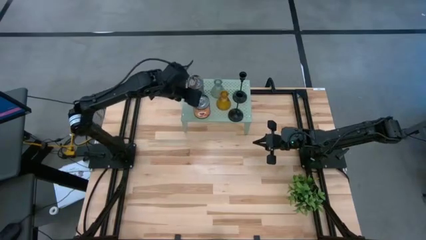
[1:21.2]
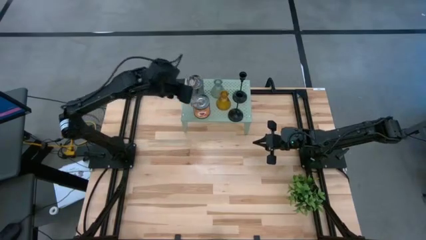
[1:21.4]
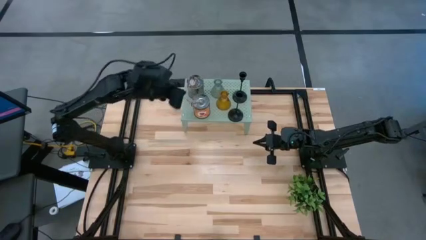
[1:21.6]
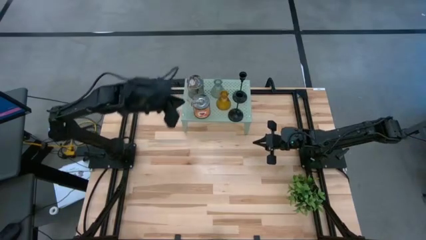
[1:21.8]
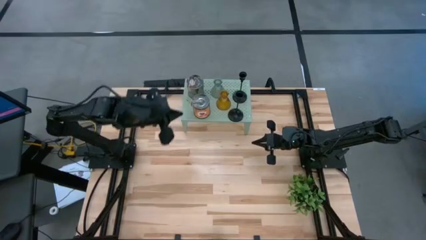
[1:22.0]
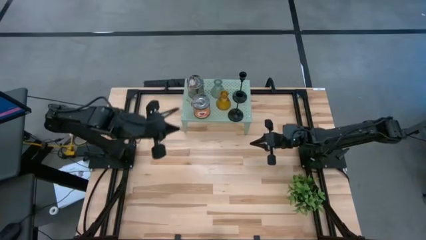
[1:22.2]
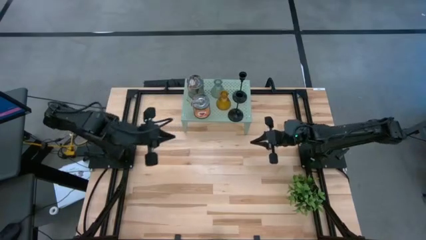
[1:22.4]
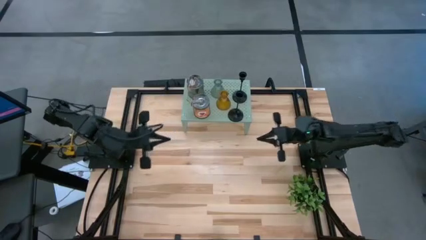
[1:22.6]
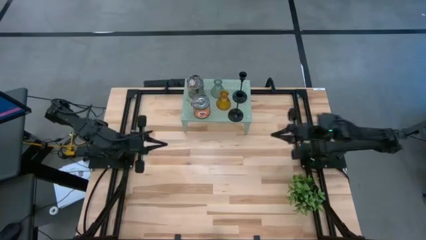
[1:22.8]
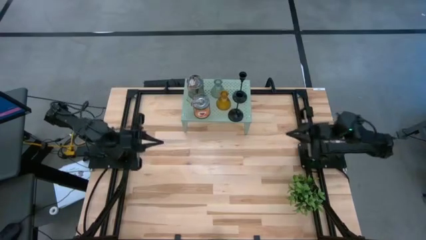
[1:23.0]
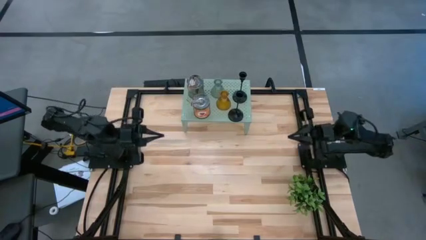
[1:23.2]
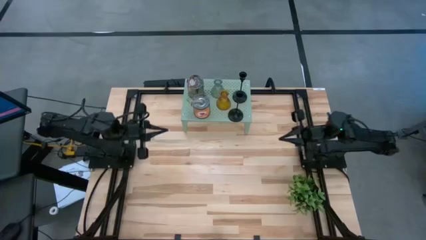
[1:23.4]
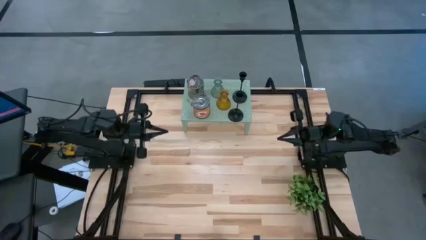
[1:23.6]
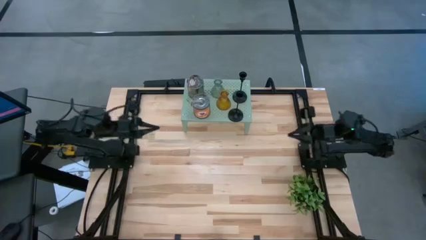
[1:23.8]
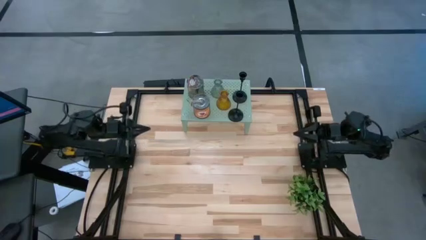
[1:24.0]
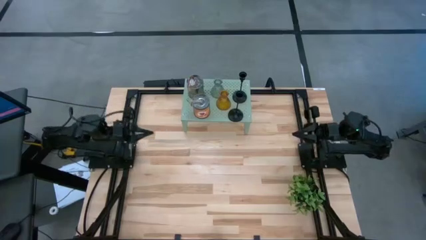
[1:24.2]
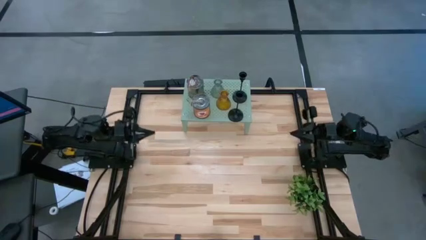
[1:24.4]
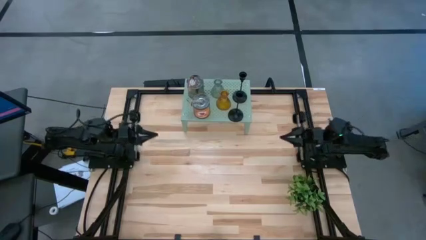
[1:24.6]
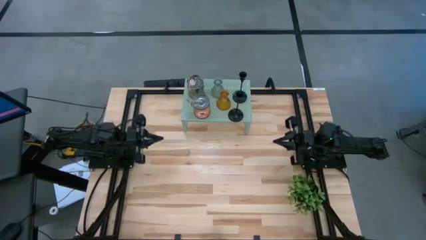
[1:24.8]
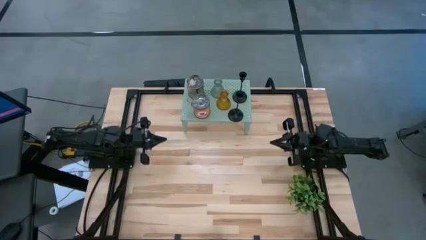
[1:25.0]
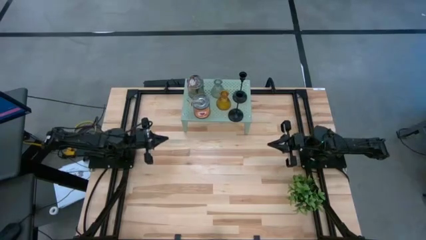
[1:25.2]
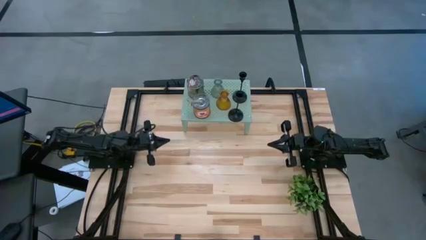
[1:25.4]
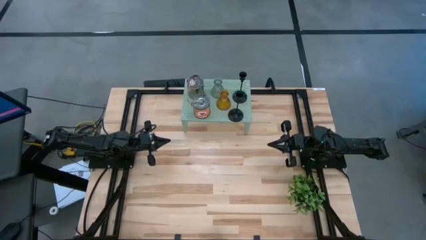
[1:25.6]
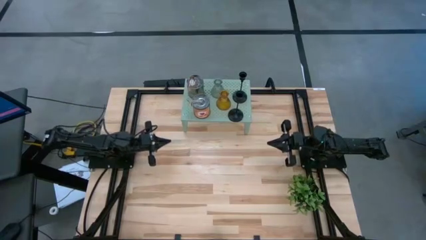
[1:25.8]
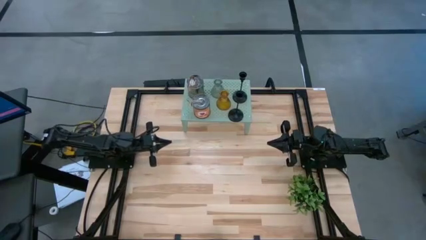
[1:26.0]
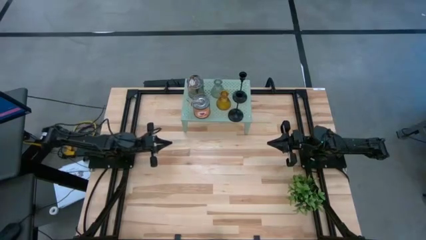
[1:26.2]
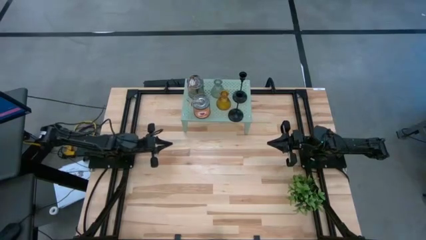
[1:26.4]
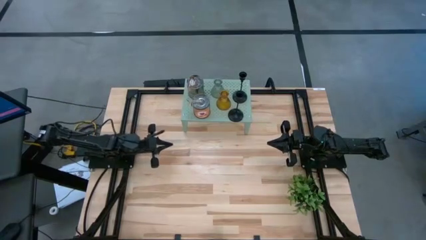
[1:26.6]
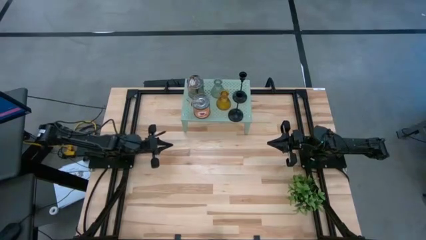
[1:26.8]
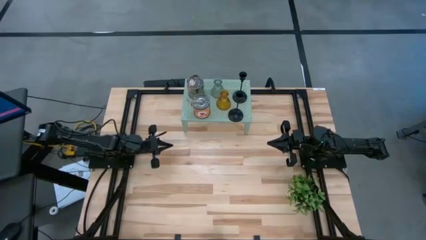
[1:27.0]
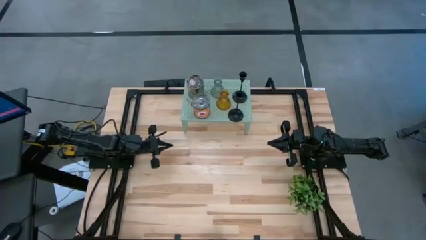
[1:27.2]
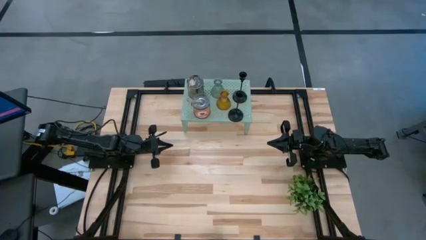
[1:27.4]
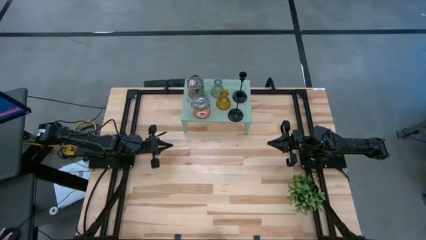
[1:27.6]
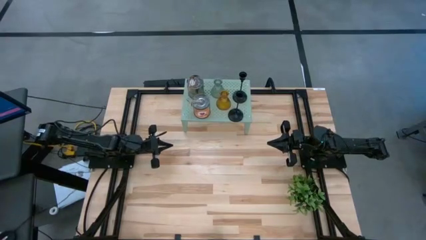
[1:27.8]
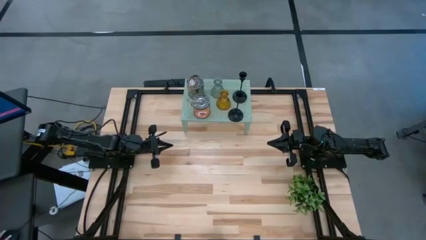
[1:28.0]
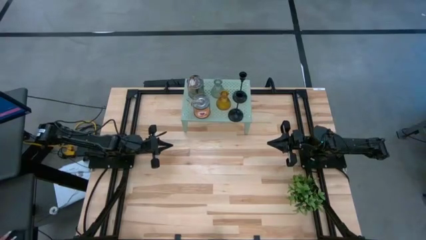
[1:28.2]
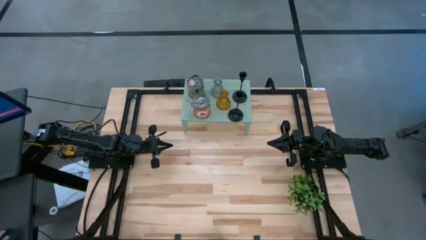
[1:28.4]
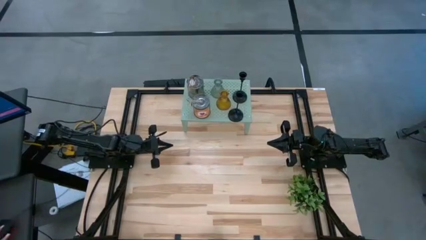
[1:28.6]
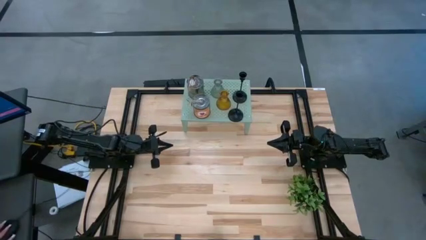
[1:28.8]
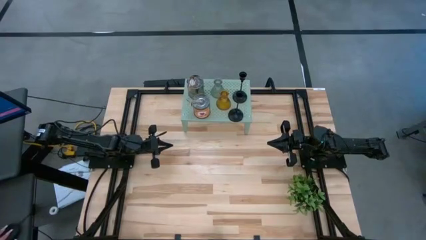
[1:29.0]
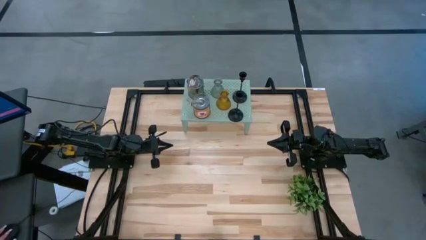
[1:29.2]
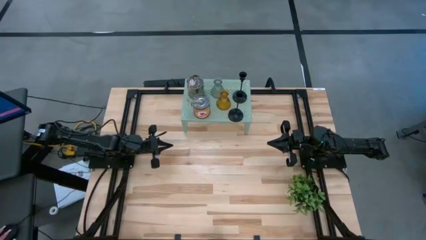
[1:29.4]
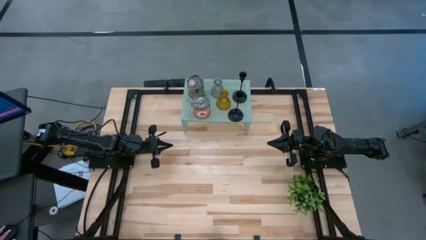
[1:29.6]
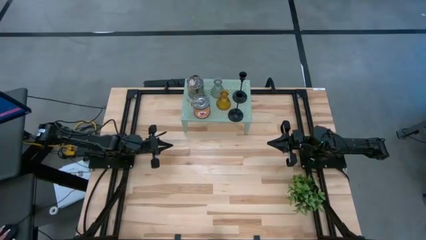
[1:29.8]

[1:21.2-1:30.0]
Task: Pick & Place candle stick holders
Return to Home Position

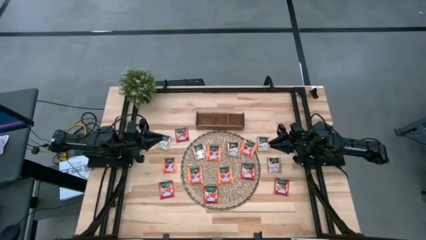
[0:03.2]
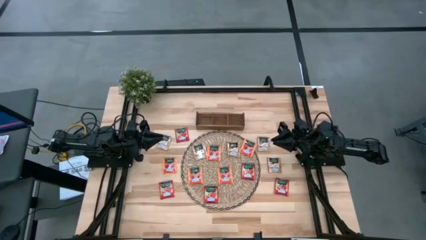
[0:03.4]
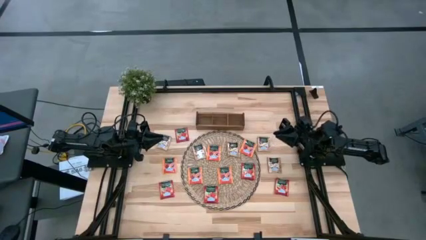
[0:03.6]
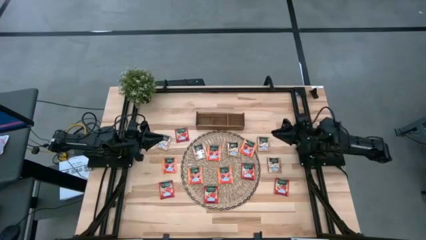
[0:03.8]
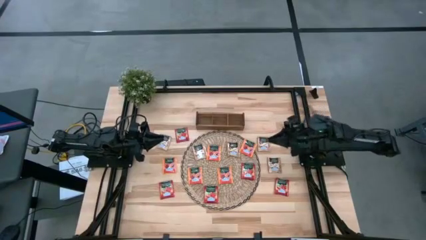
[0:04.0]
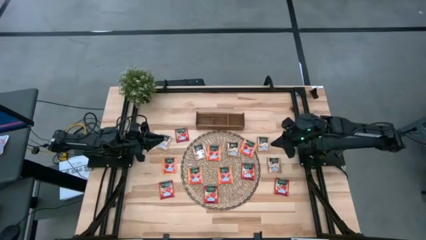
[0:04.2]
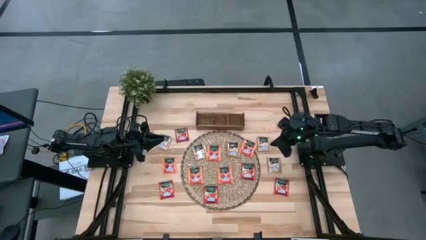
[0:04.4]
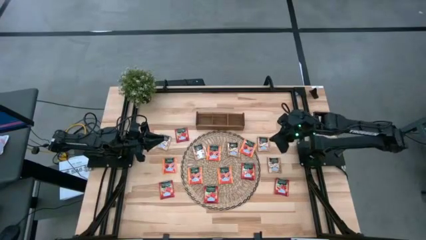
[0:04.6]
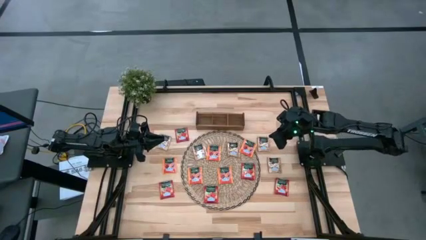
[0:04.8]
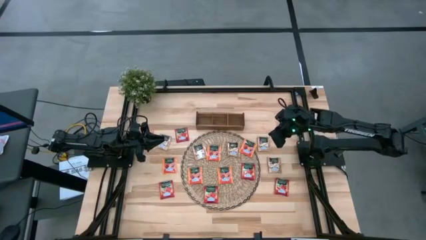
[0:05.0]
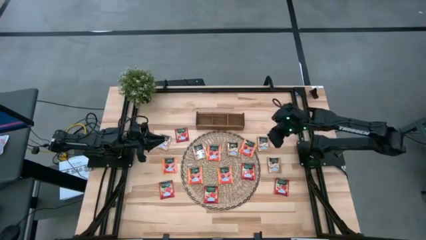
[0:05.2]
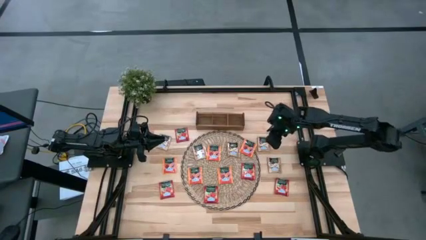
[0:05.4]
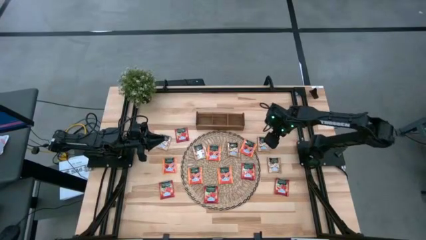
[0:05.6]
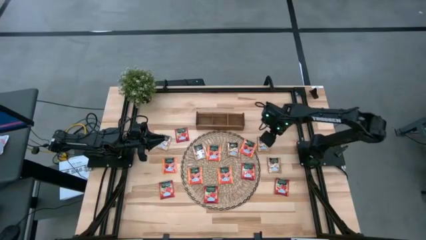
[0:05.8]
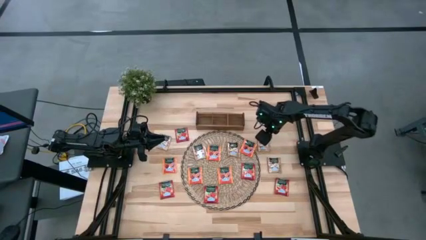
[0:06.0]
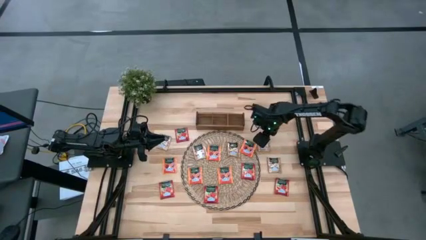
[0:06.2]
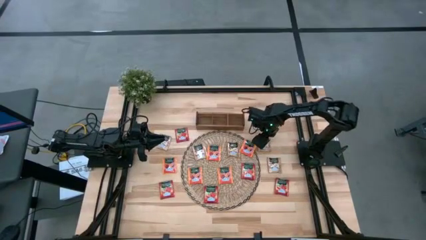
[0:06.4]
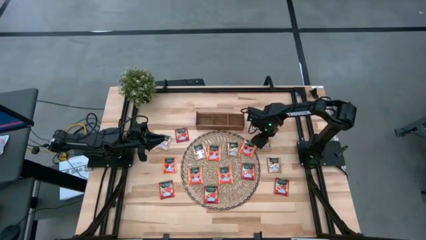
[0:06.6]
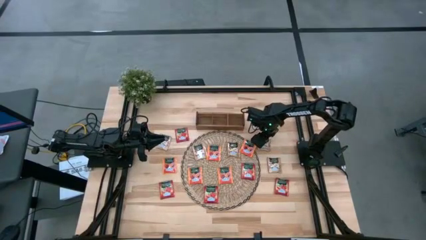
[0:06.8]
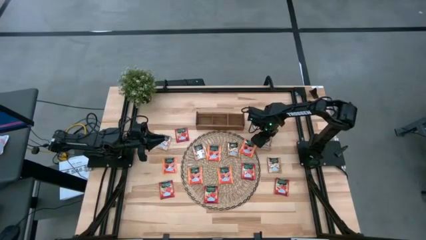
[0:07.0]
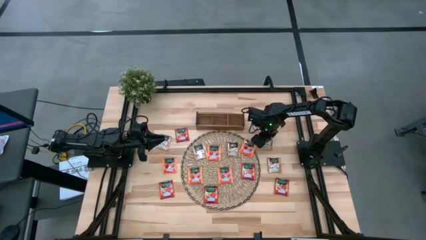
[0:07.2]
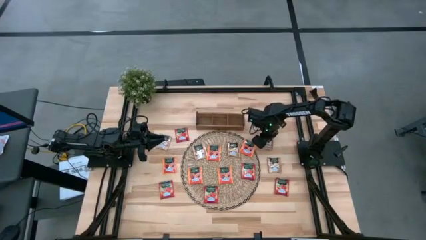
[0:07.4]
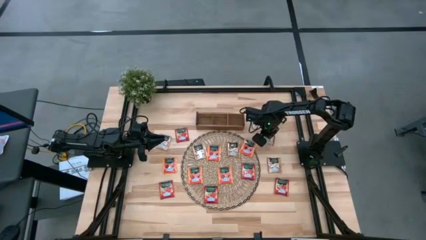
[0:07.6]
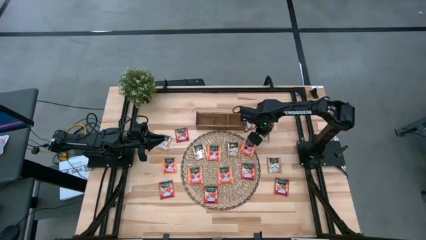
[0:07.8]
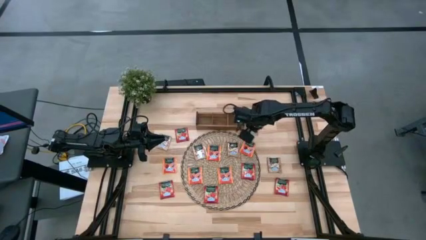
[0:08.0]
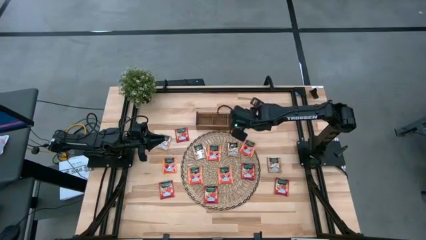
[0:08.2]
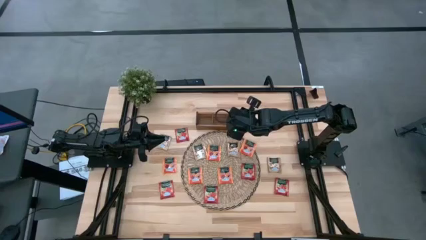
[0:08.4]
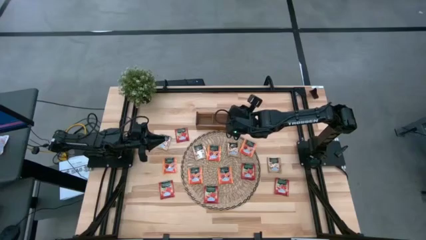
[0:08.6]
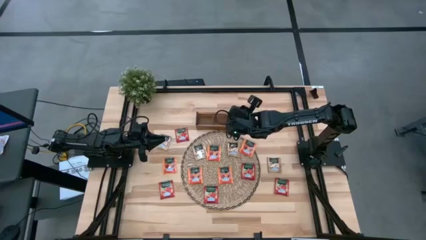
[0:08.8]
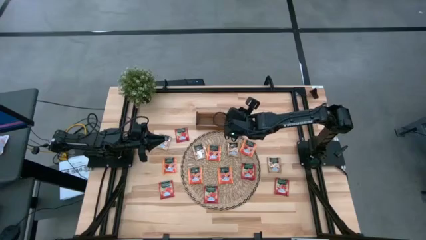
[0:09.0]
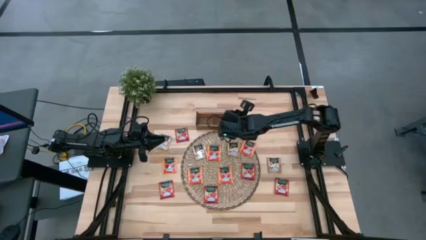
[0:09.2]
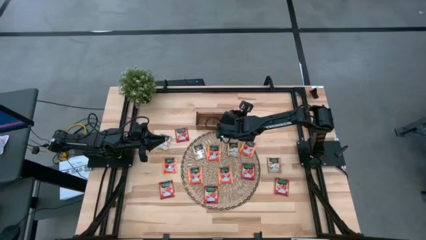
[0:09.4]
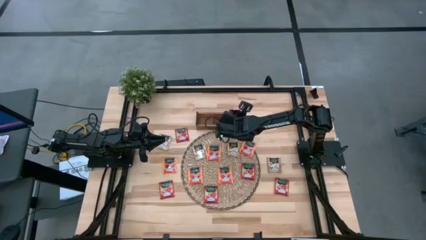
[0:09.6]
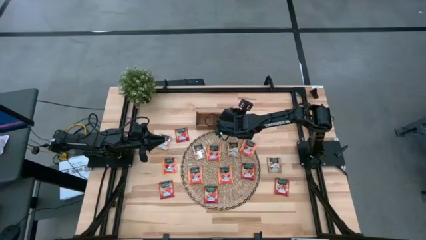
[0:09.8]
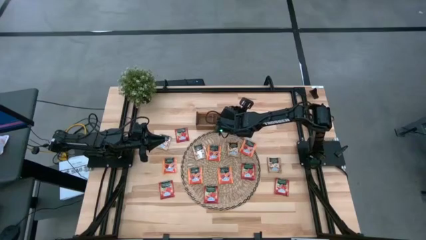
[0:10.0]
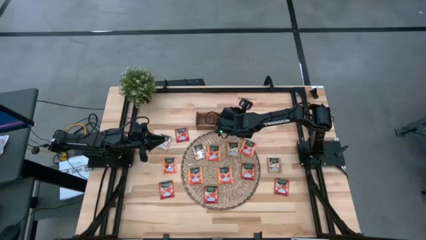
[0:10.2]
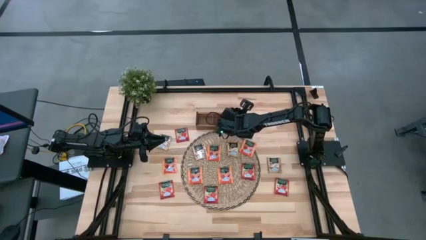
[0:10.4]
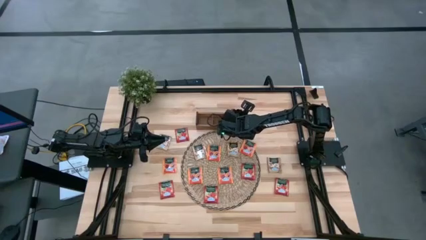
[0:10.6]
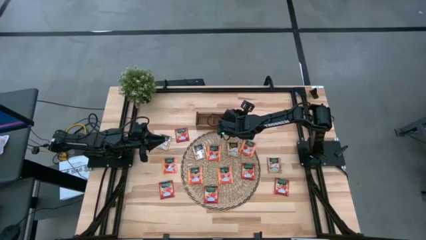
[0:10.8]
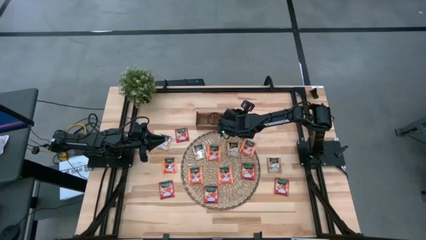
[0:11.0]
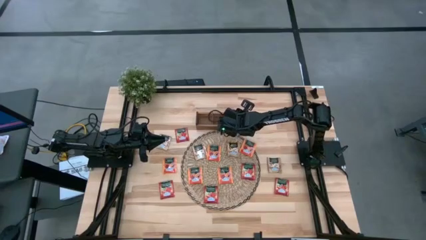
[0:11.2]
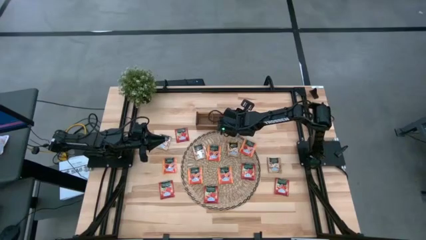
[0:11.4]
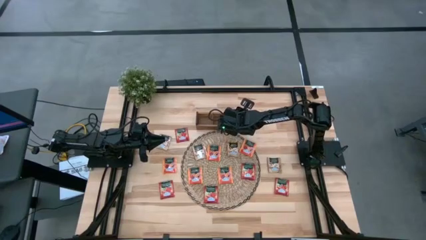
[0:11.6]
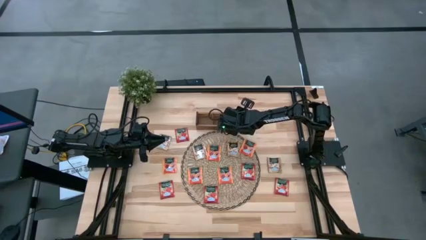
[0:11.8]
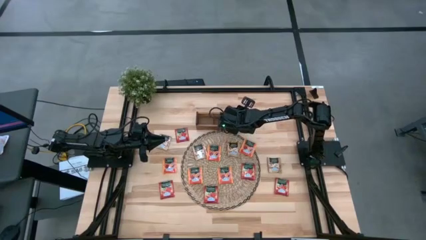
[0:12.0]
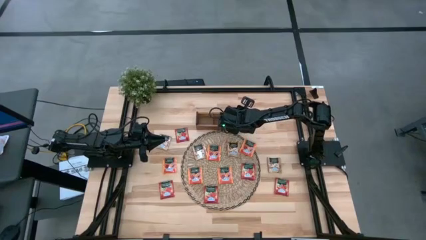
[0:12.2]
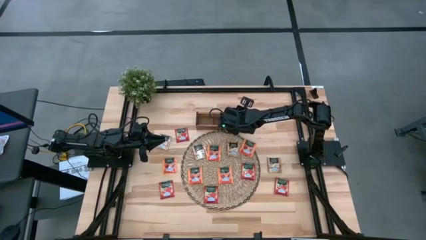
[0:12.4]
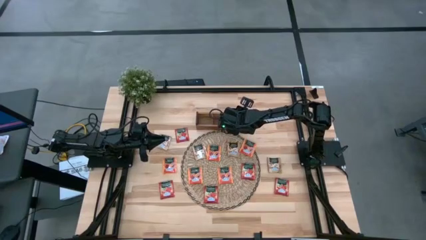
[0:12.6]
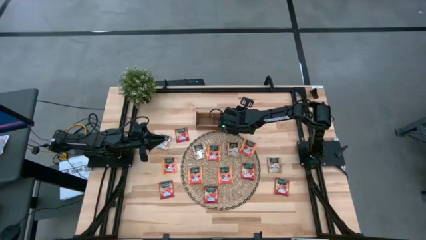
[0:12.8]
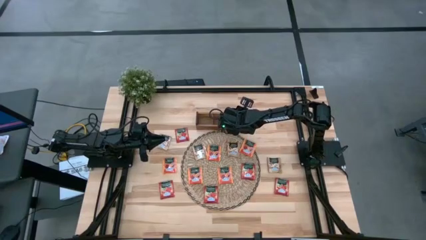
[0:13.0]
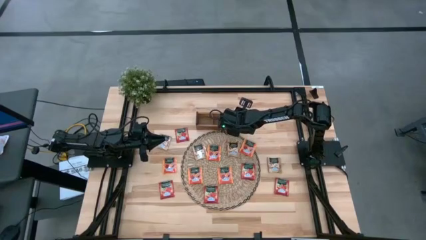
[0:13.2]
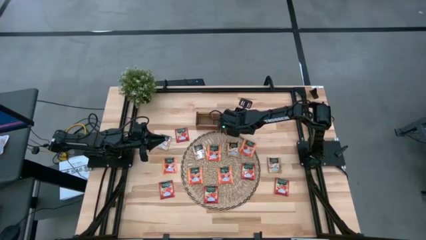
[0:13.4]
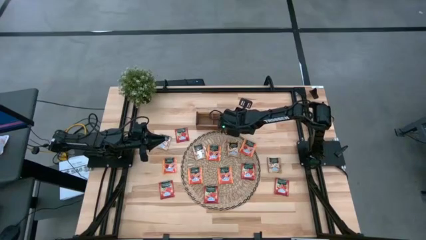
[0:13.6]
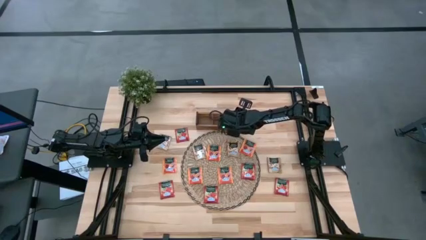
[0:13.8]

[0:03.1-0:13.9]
Task: Pick & Place Tea
Put the brown tea bag into the right section of the wooden organizer
